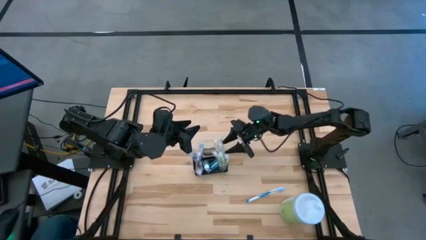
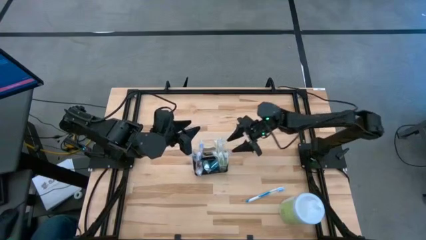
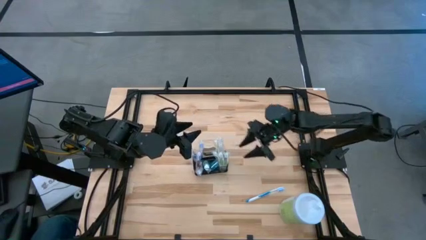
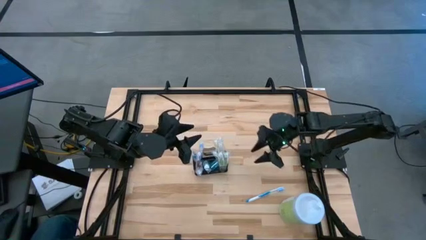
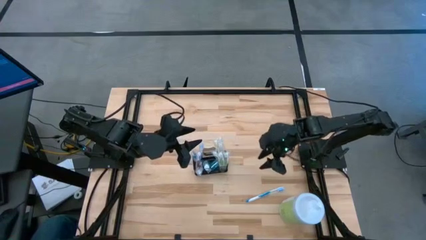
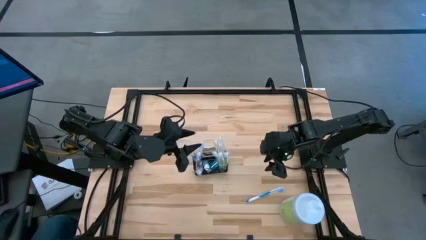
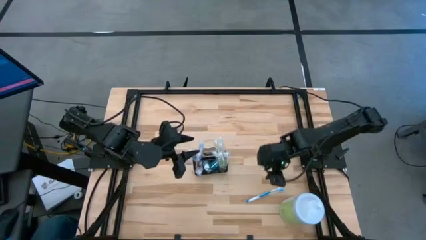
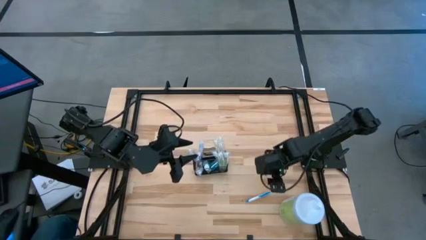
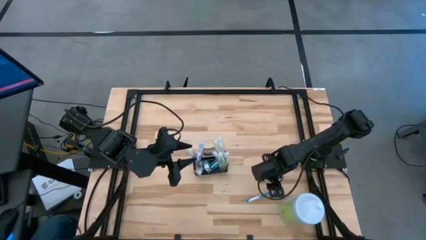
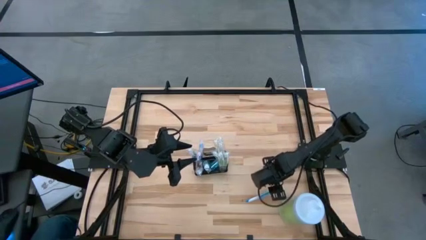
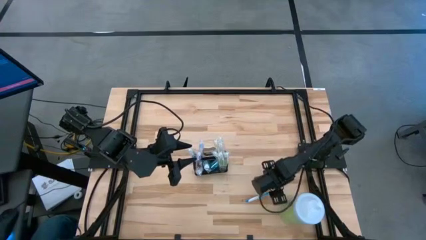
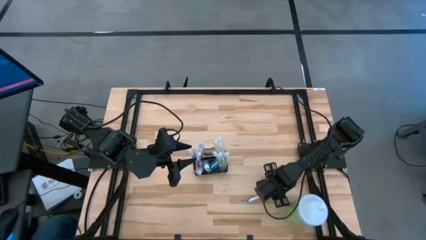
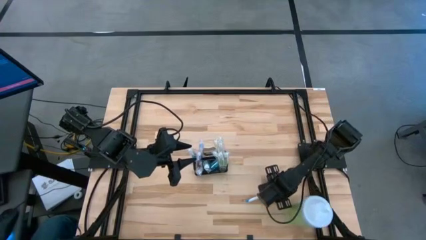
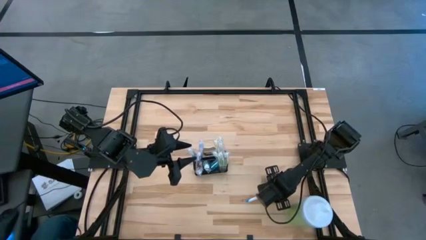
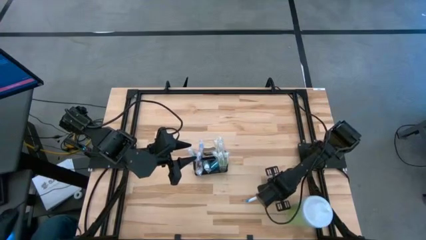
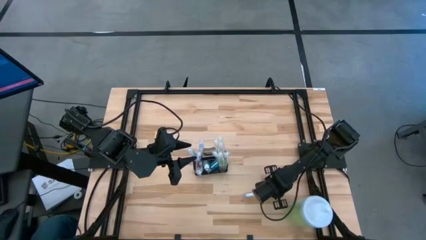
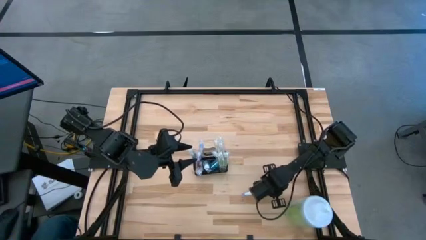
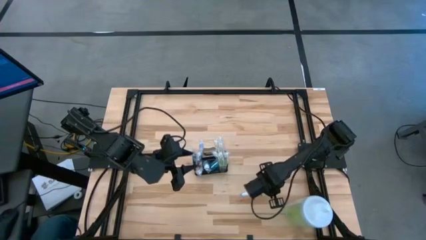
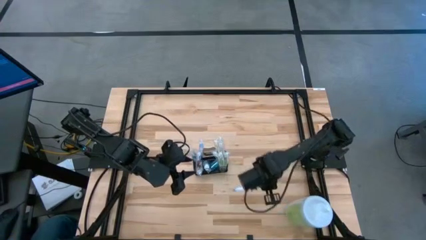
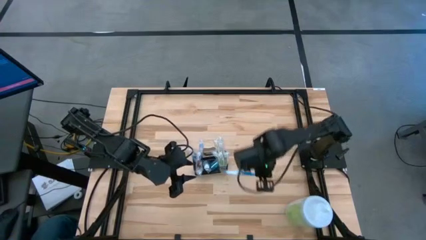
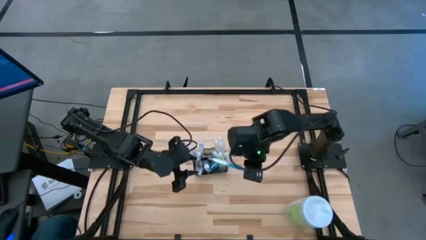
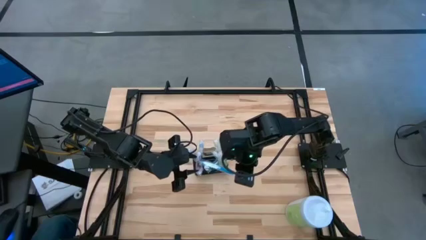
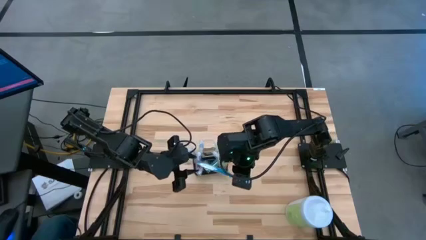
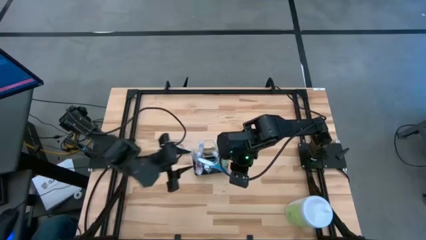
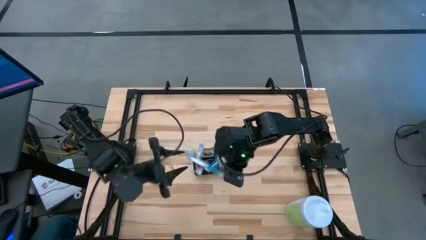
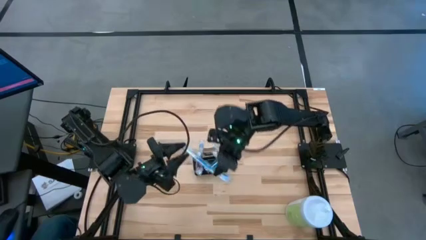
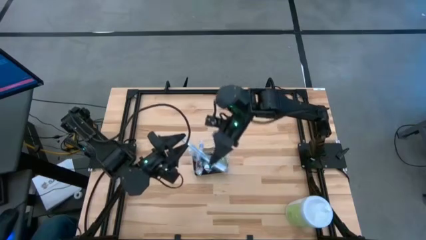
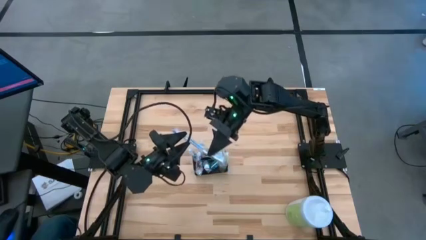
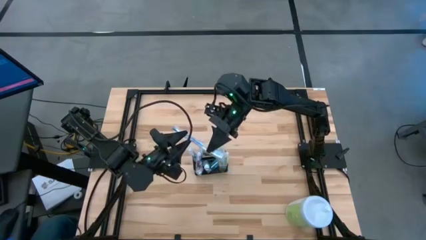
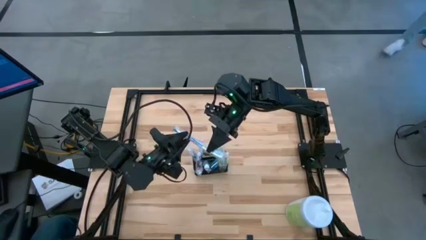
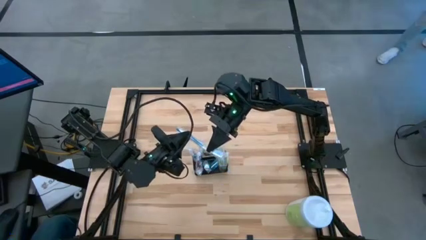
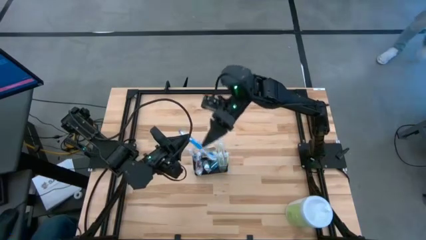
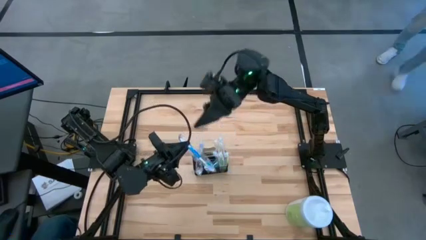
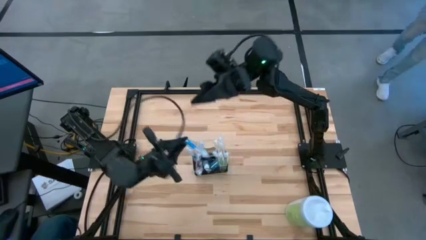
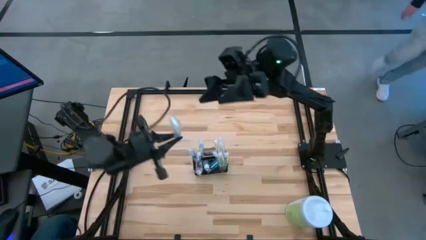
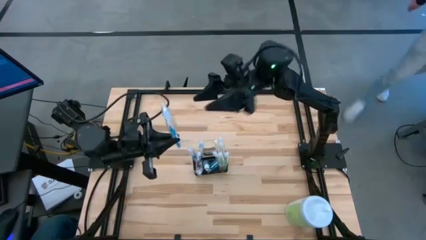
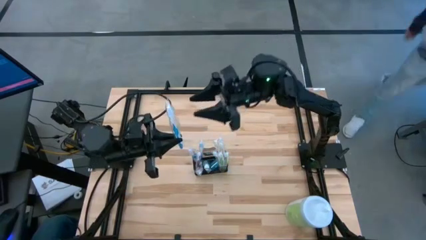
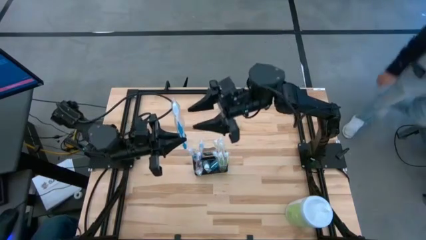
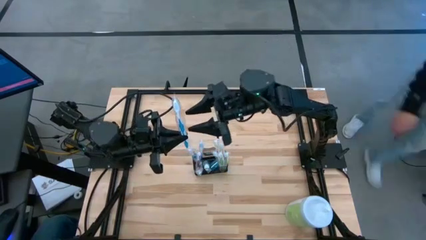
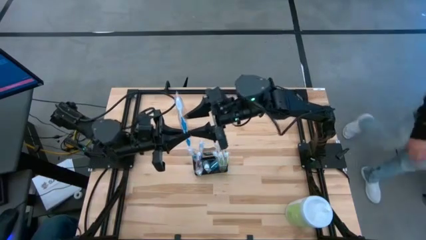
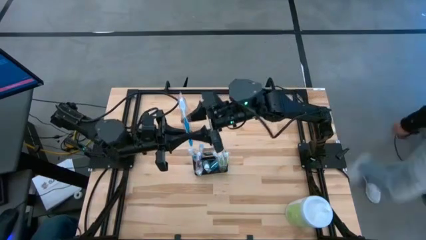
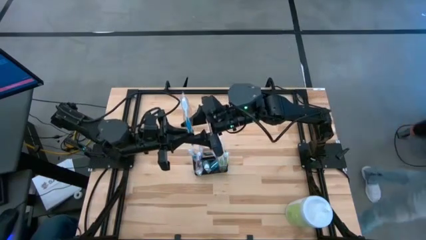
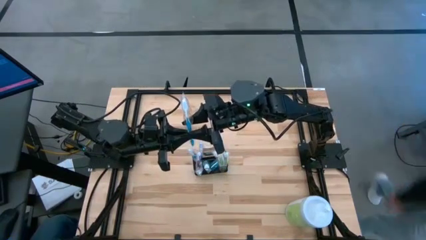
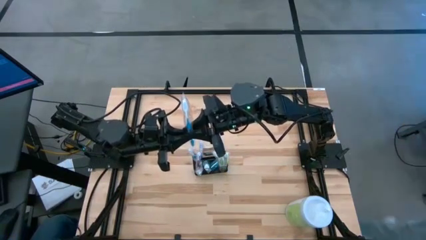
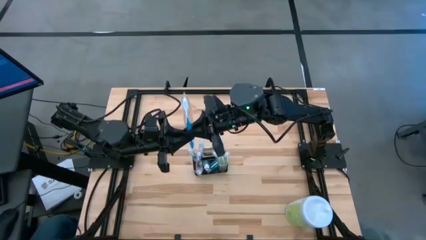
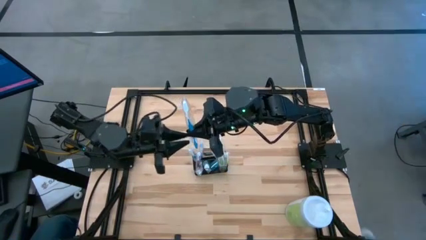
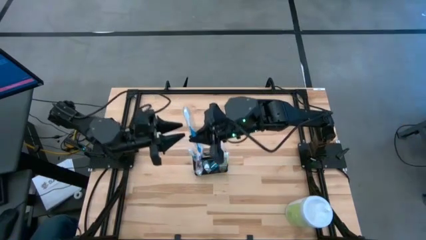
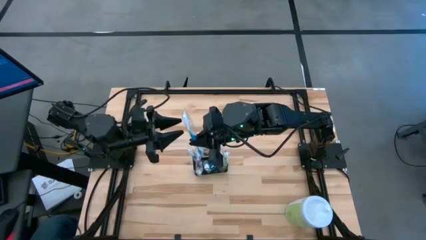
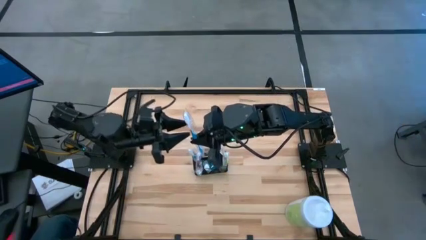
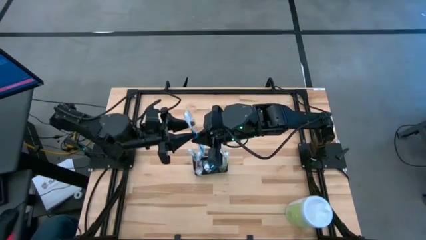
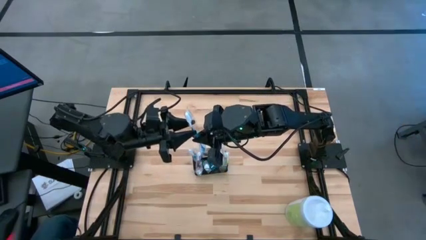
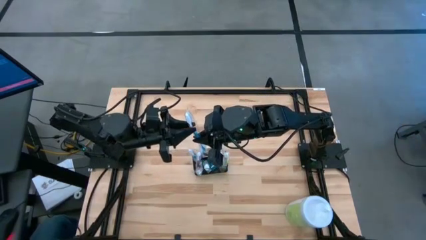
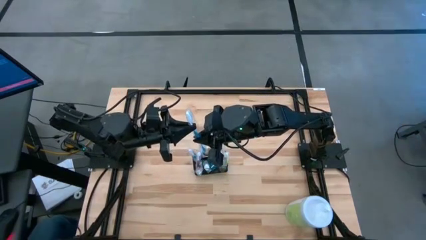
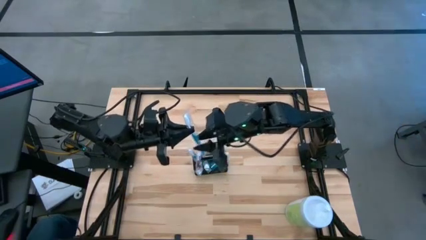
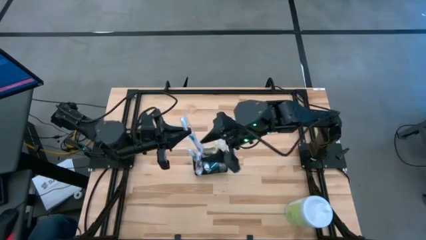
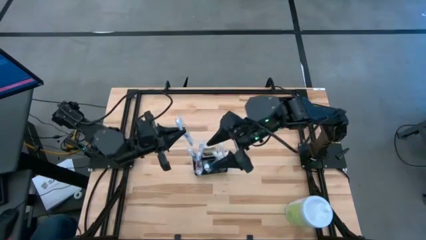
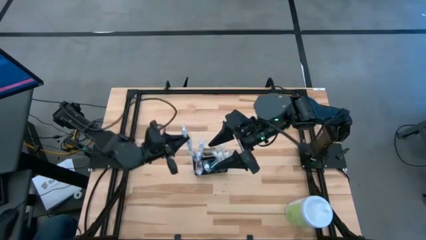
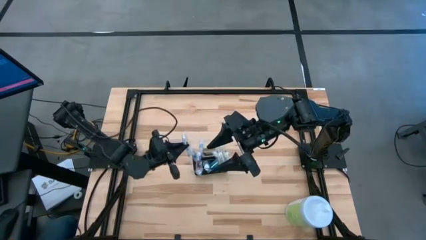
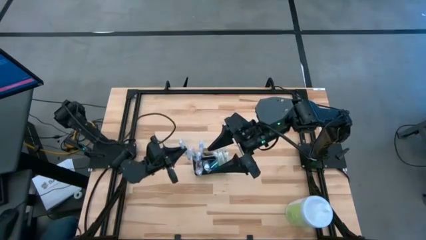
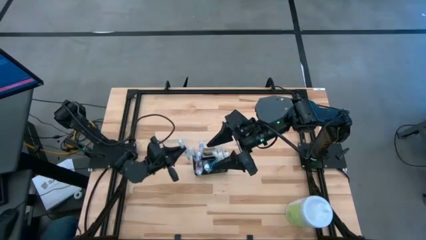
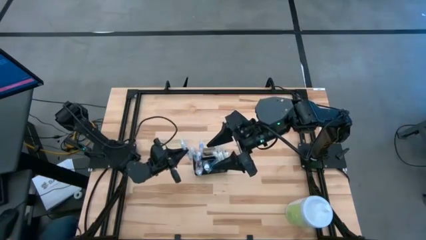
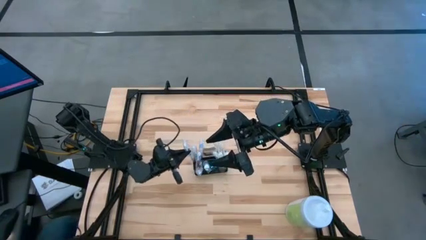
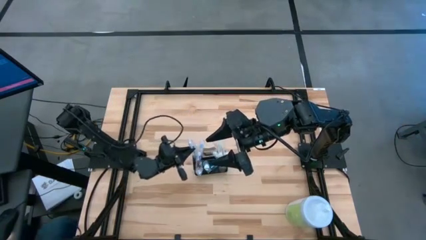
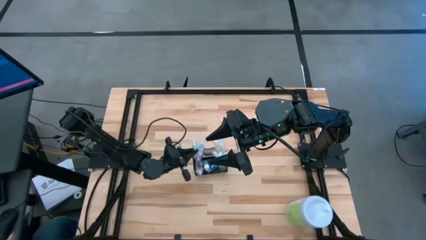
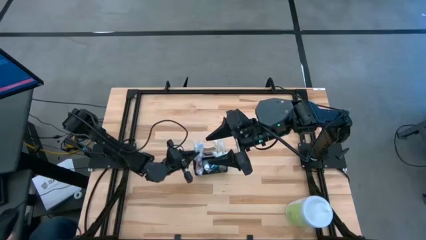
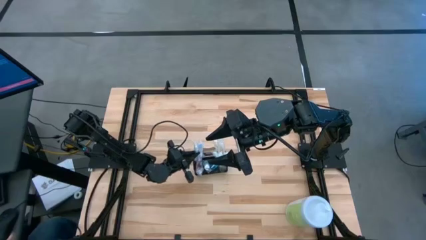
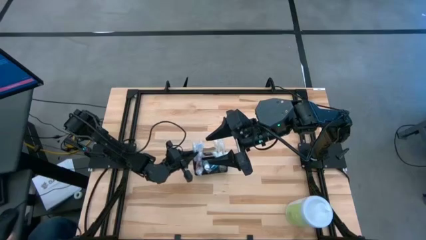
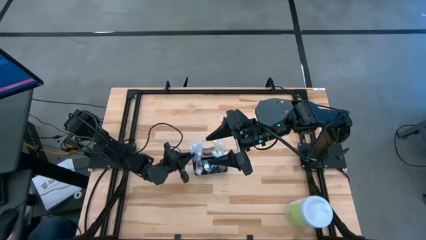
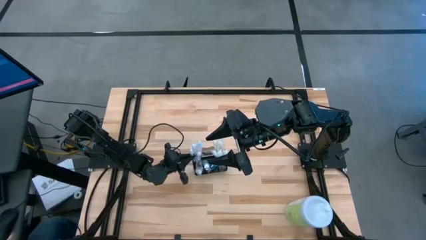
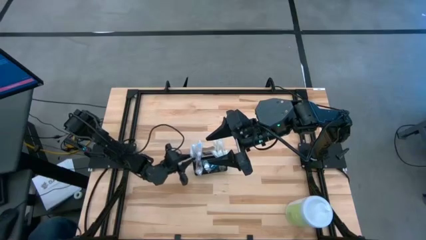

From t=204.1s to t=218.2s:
Task: Pick & Place toothbrushing station
Put the blue toothbrush into the top left section of the mesh organizer

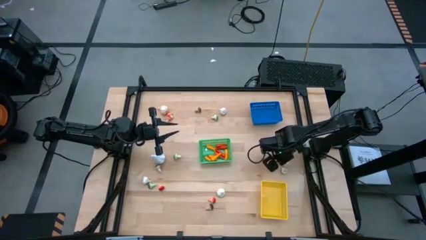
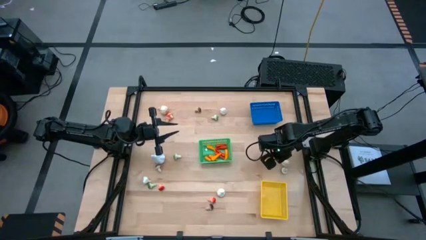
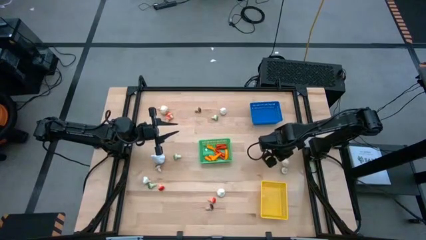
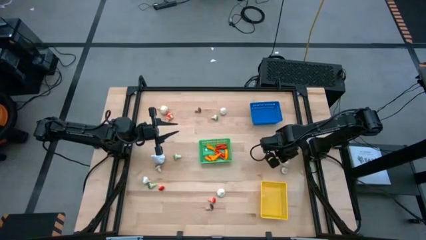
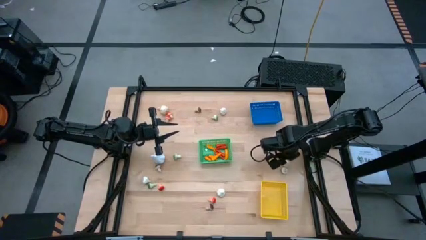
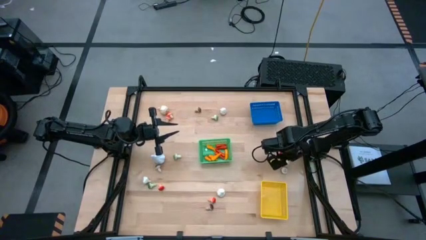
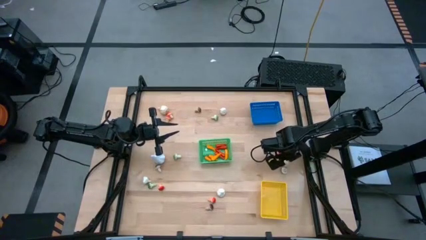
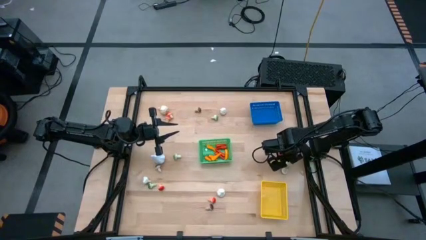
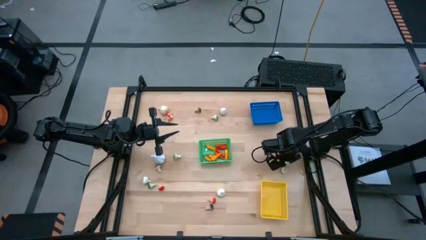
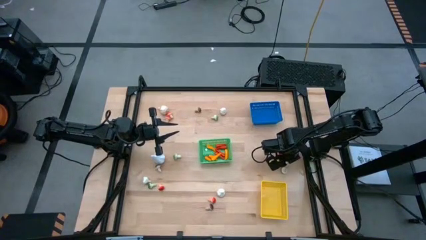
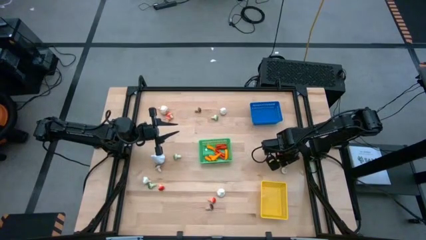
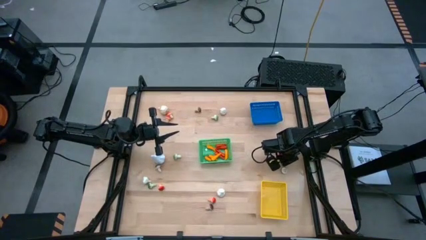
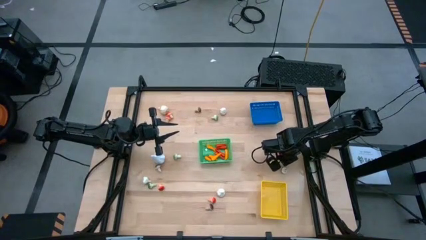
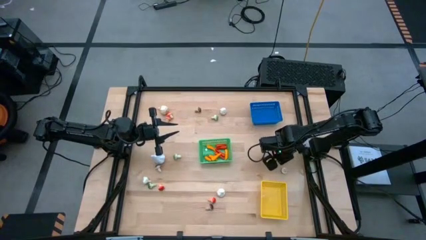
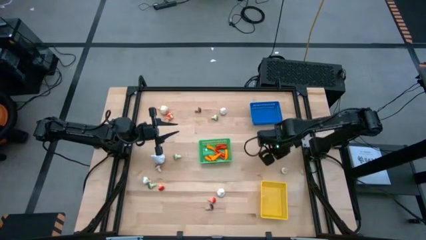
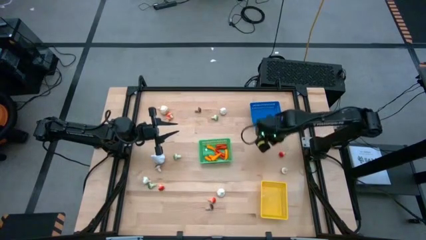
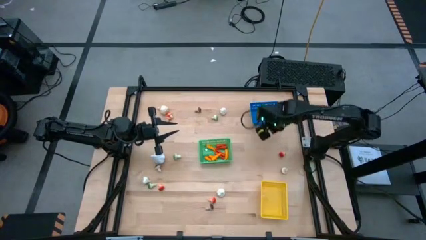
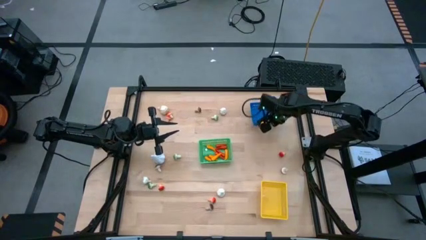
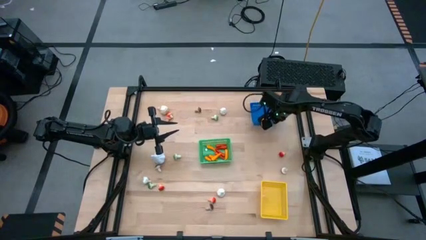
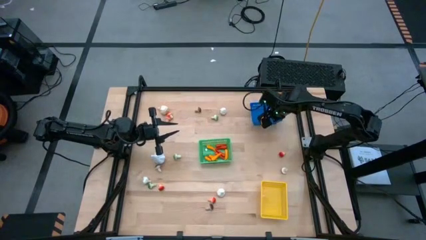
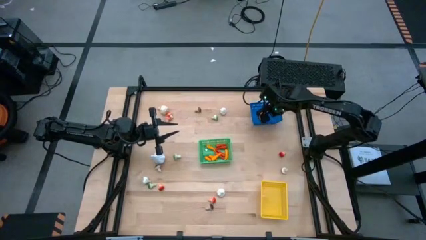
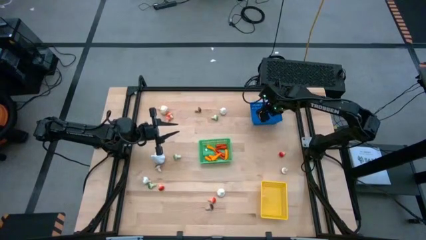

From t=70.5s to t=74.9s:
Task: Sort produce into baskets
Put the garlic into the blue bin
